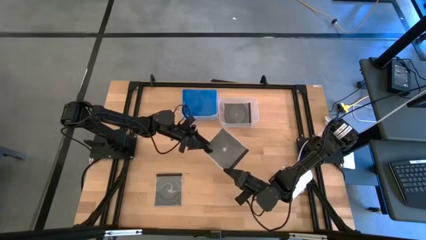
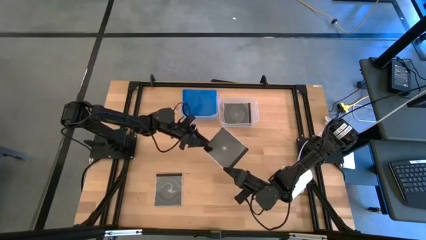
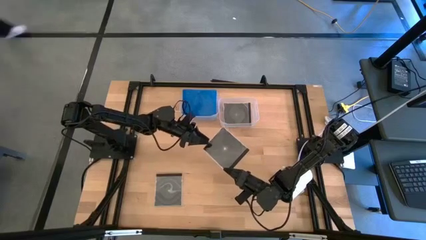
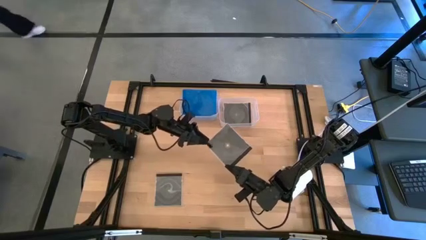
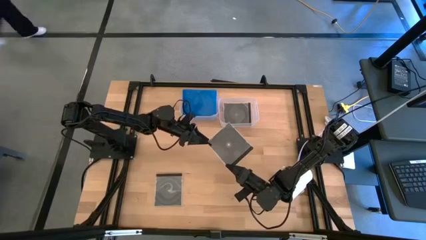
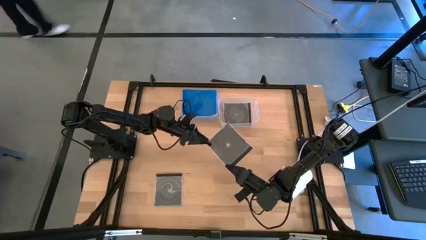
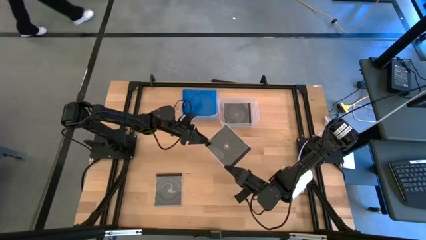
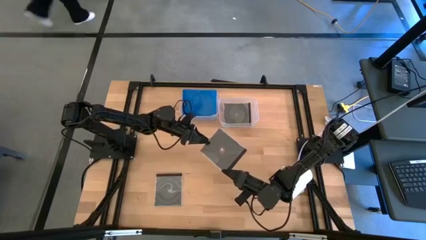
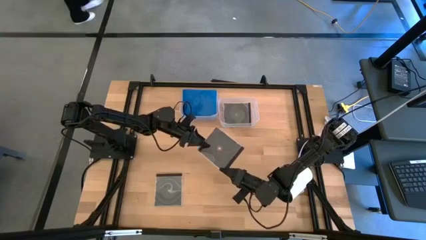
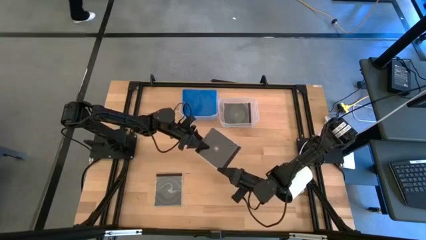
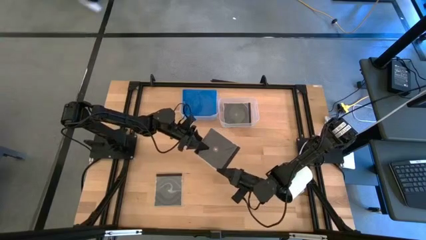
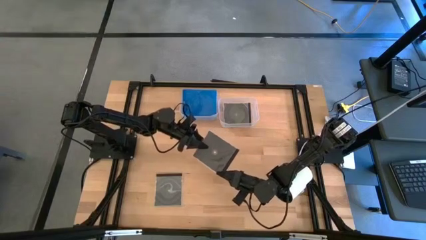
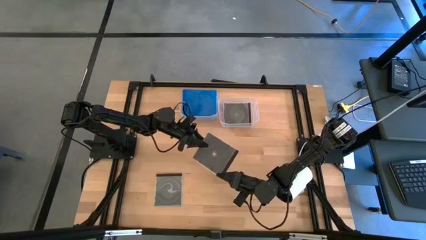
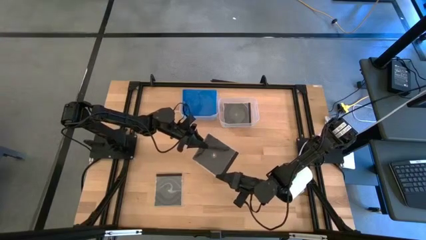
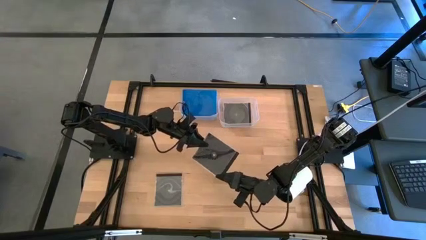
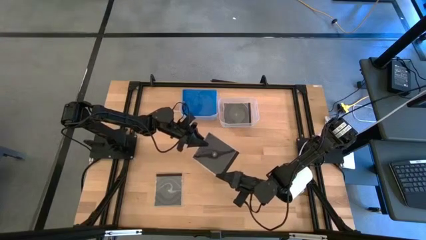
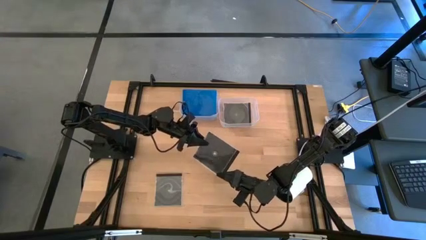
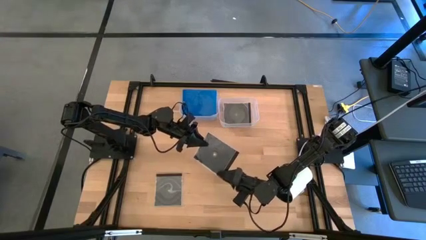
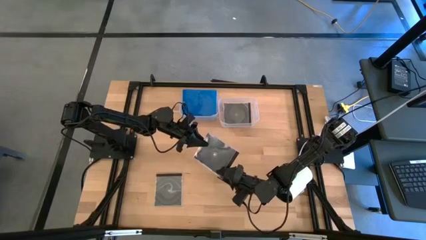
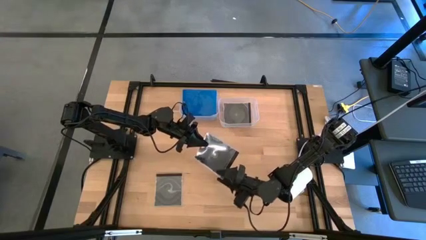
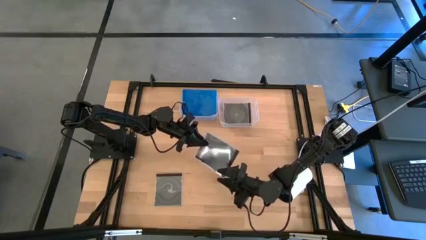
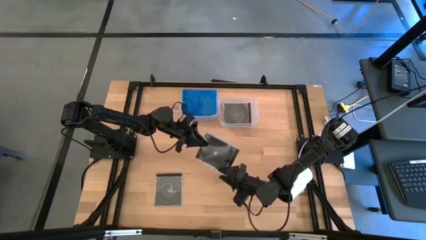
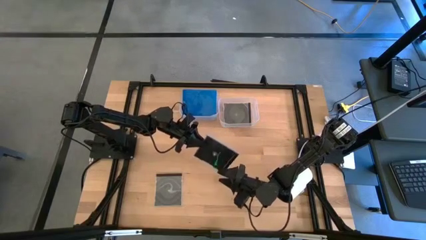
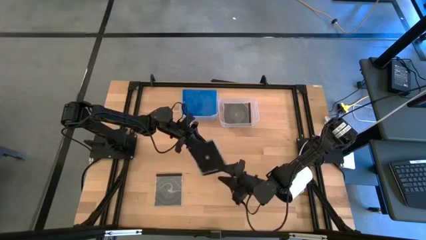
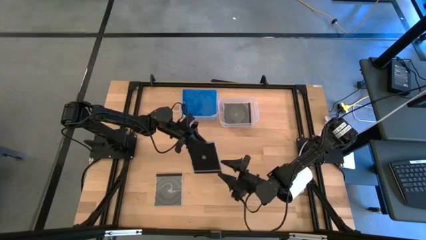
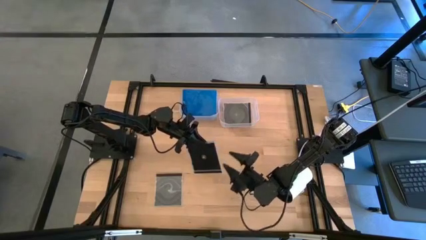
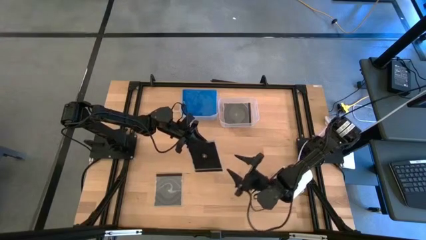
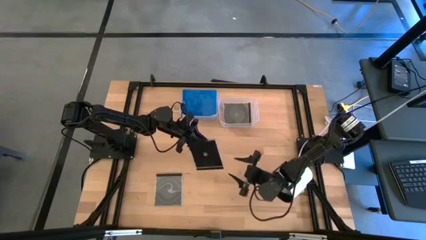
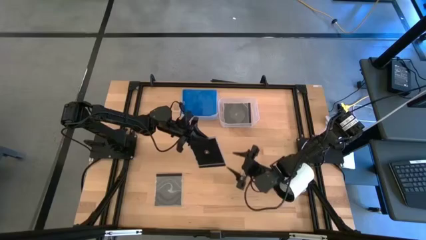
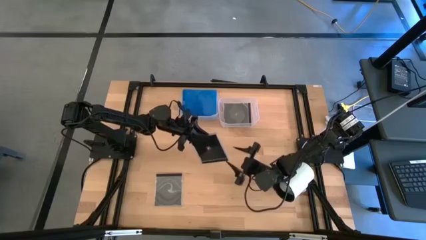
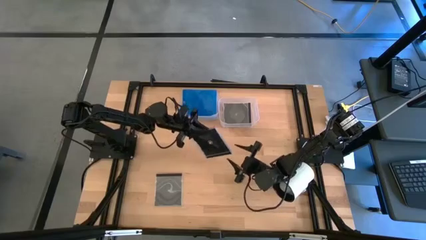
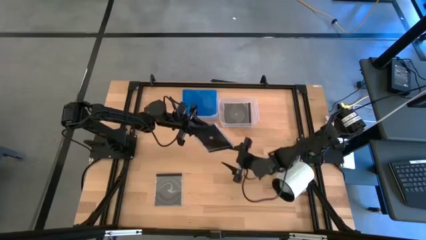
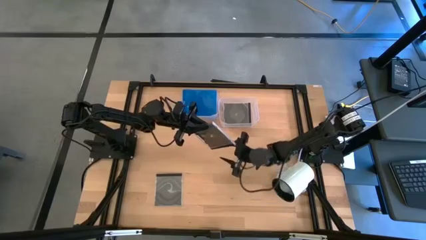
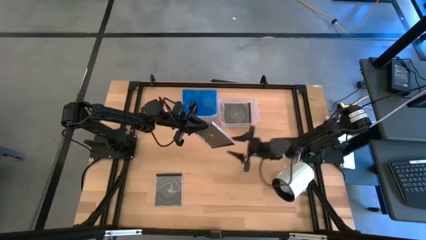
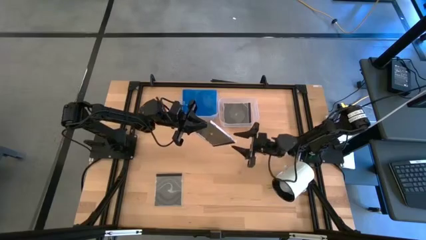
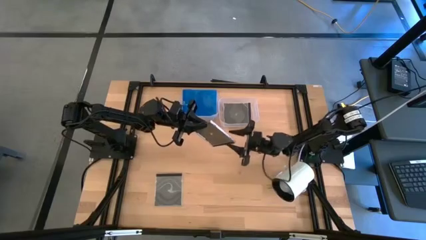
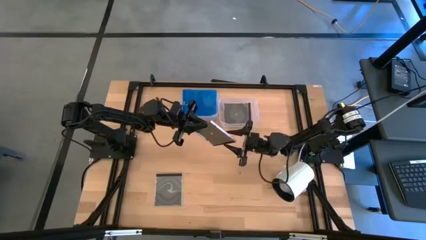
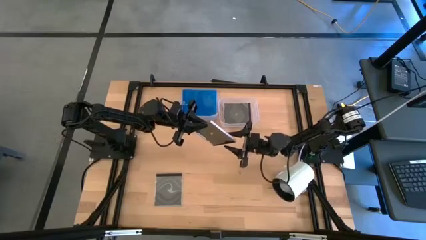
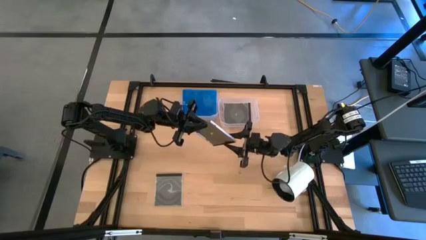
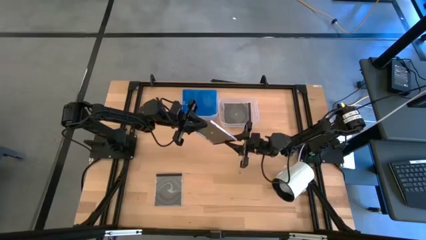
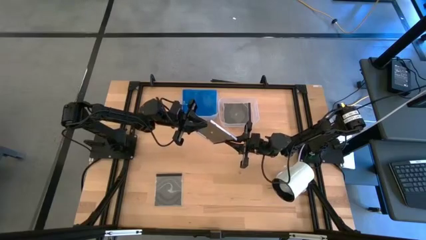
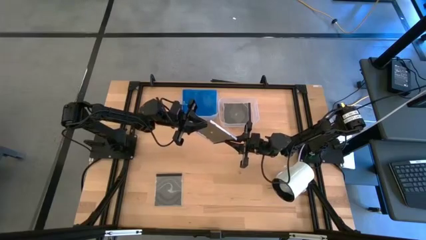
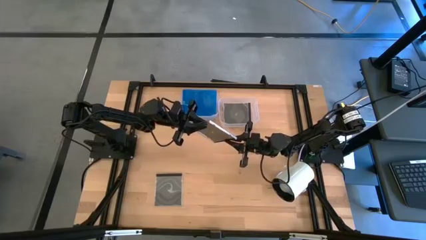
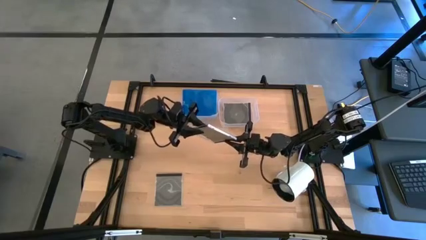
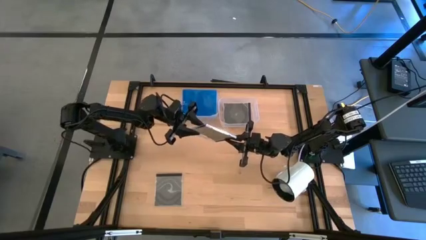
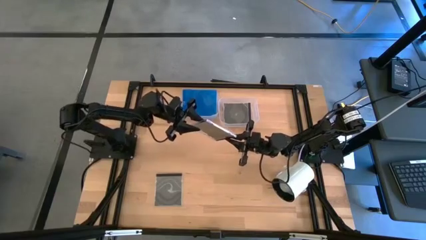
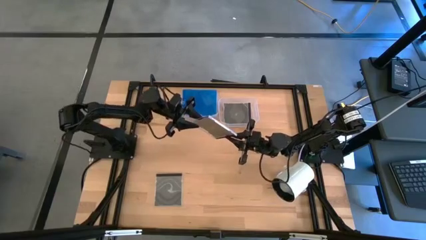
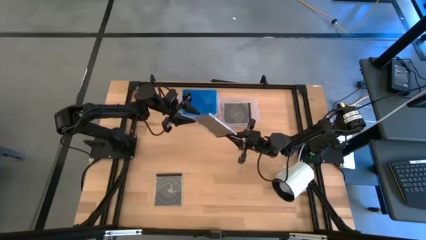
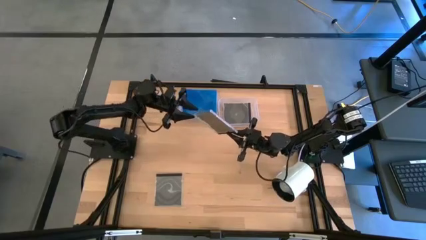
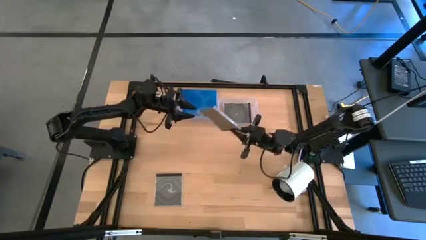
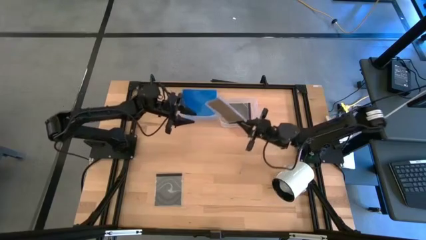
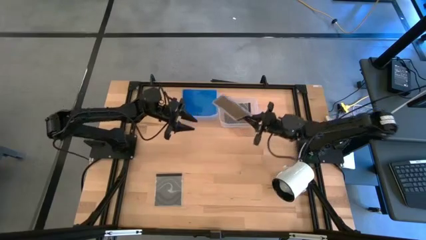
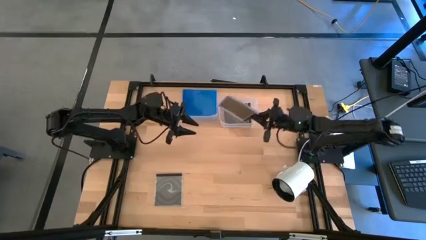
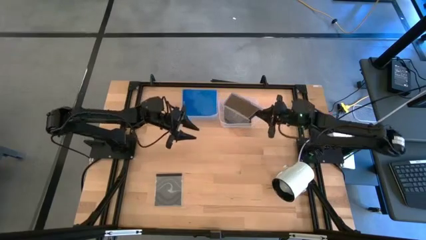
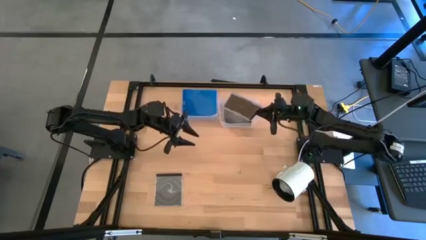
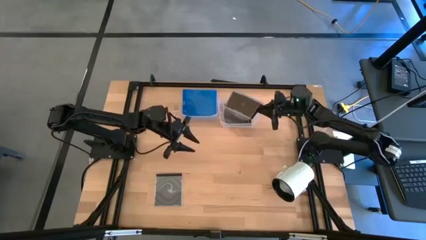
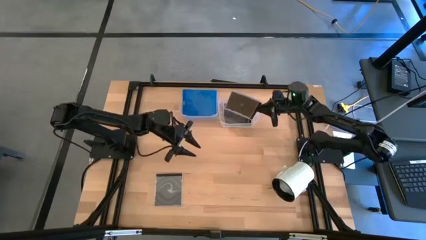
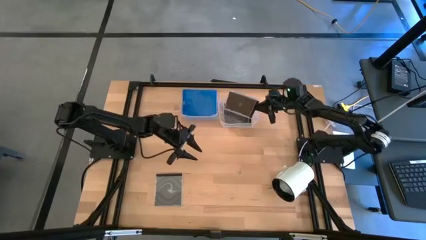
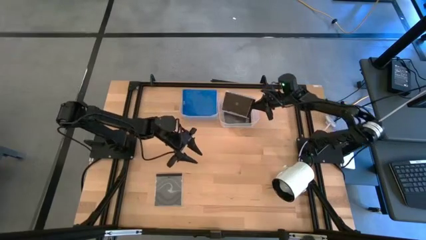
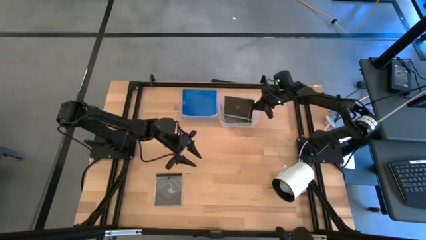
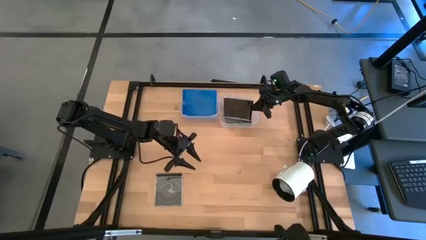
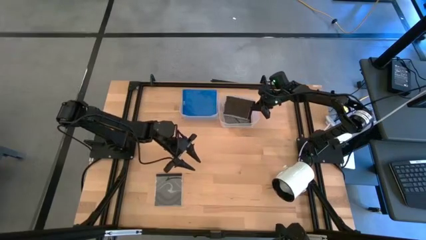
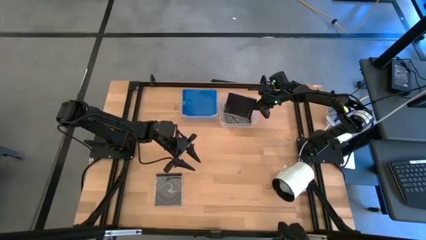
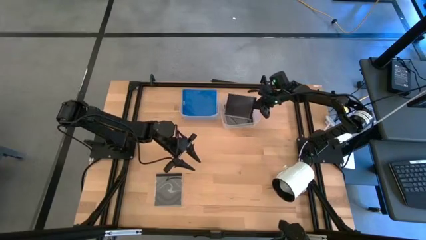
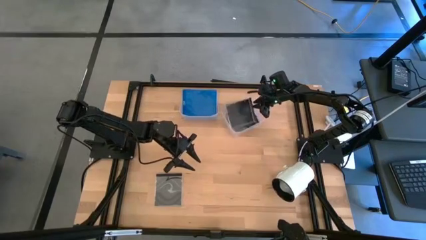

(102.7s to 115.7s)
Task: Pick & place jewel cases by type
Put the right black CD case into the transparent bin

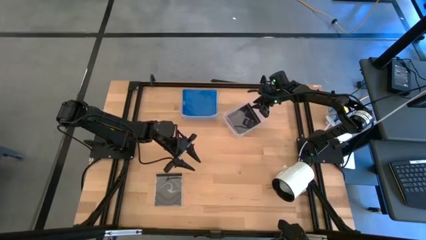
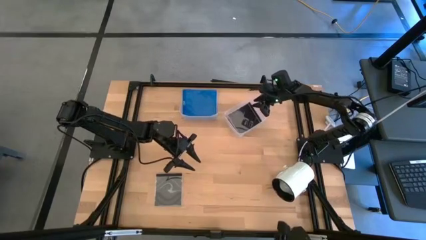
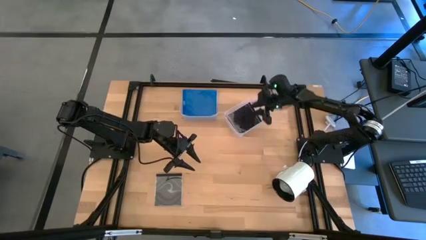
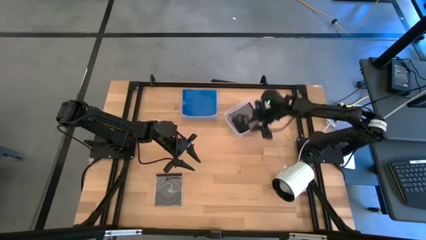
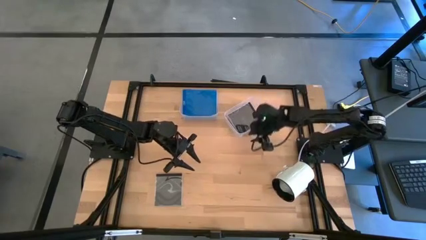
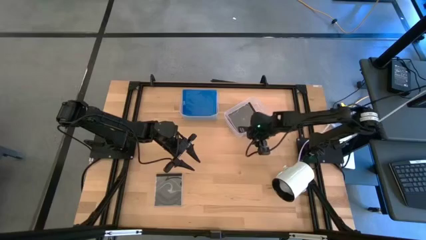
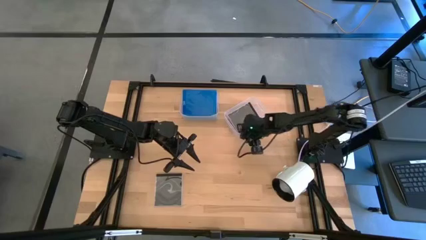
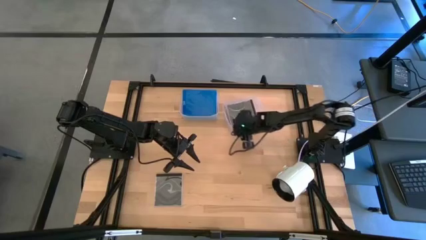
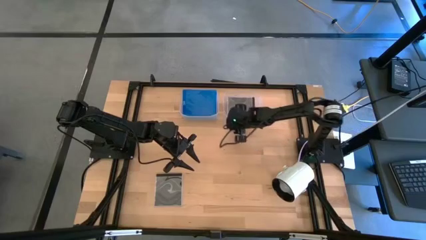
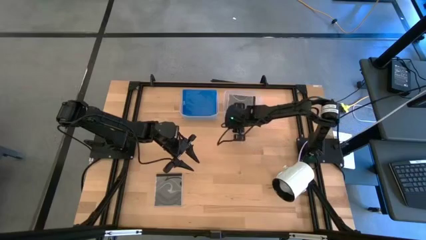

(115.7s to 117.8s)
Adjust the right transparent bin on the shelf
